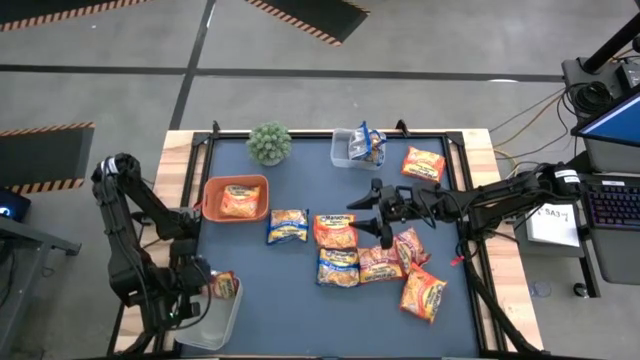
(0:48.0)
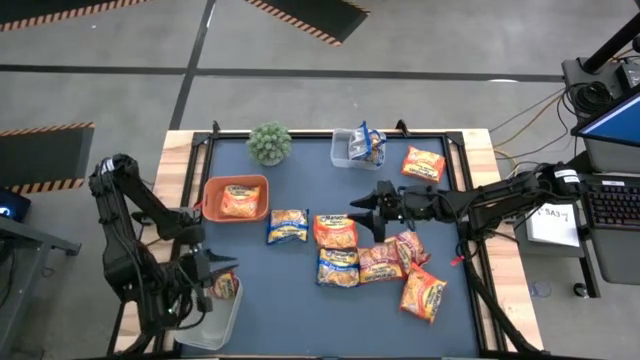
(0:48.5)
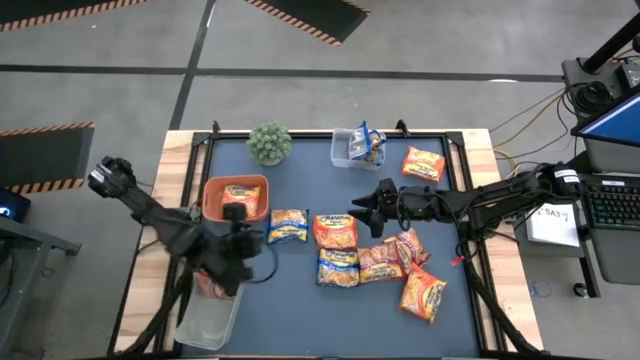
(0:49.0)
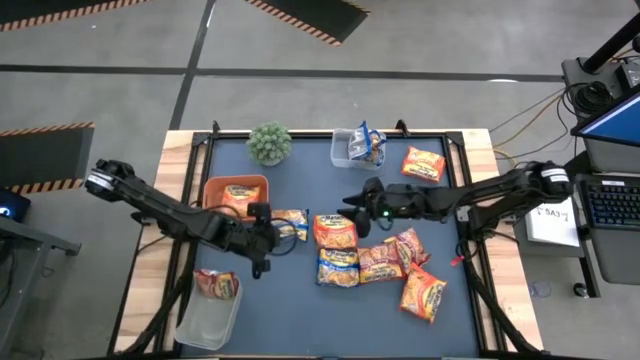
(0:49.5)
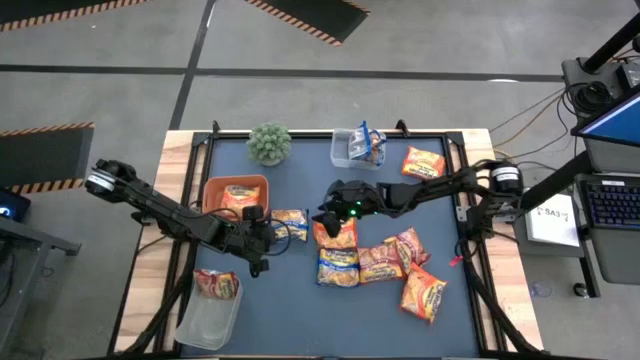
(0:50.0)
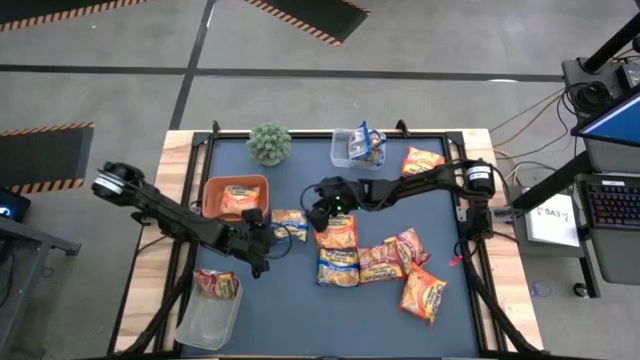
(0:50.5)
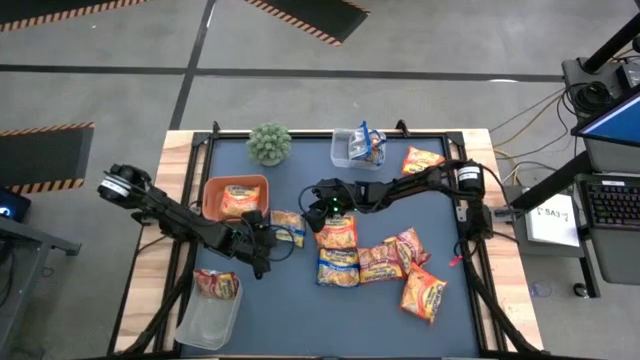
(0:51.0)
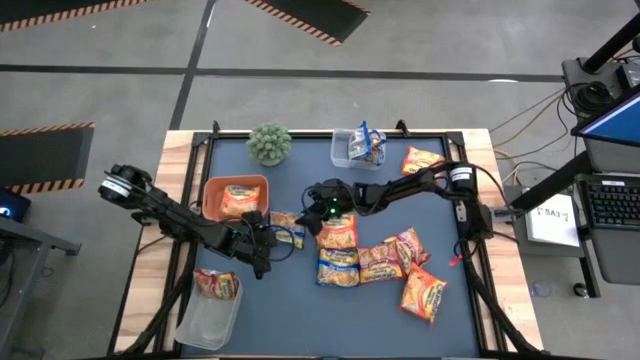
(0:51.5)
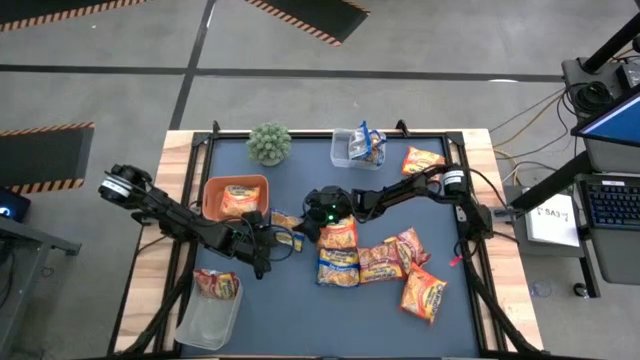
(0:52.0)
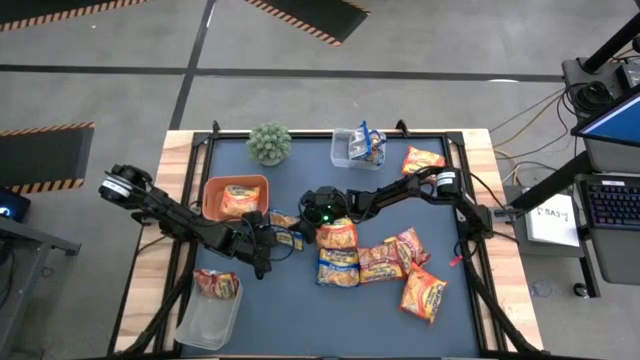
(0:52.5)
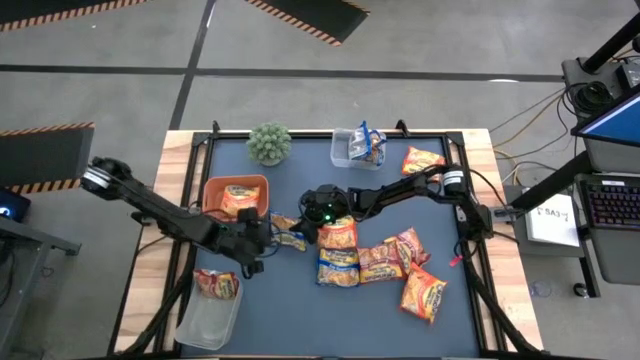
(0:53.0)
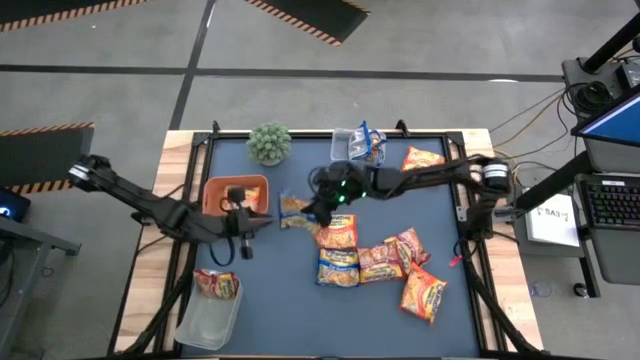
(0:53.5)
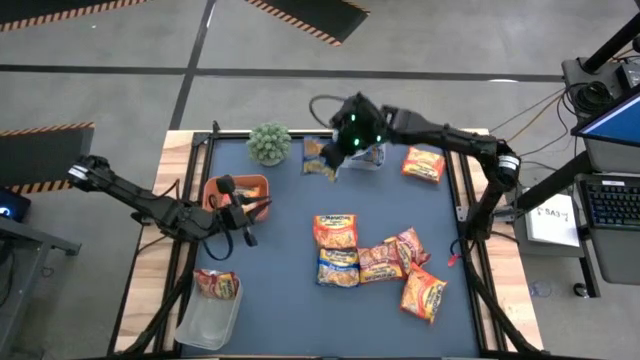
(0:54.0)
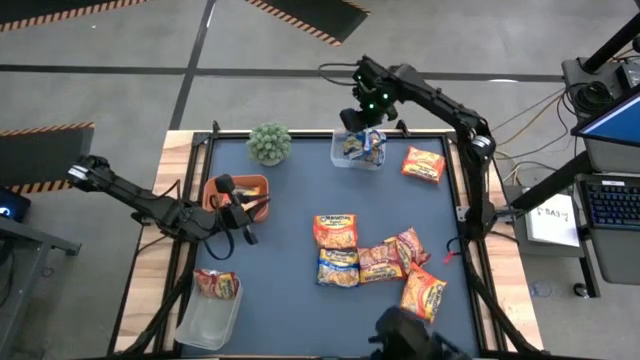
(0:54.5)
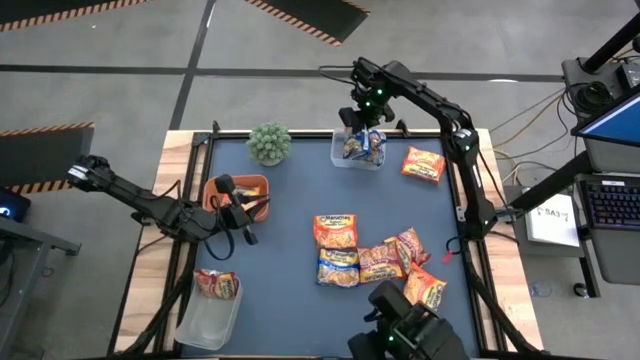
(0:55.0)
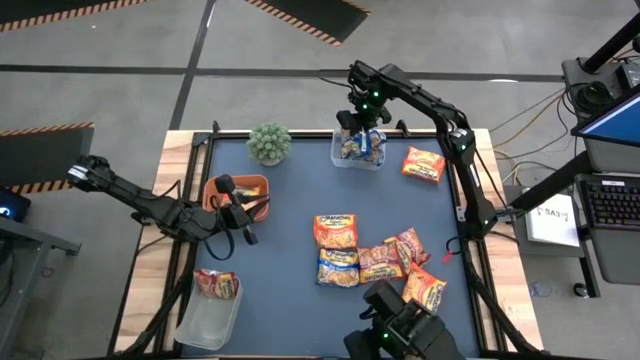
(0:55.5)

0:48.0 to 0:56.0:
Task: Sort Maruchan noodles
Put the blue noodle pack into the transparent bin

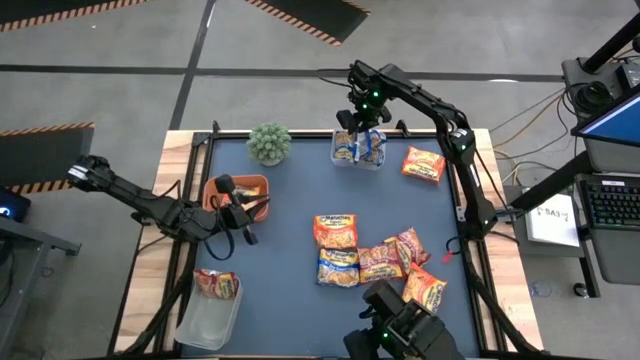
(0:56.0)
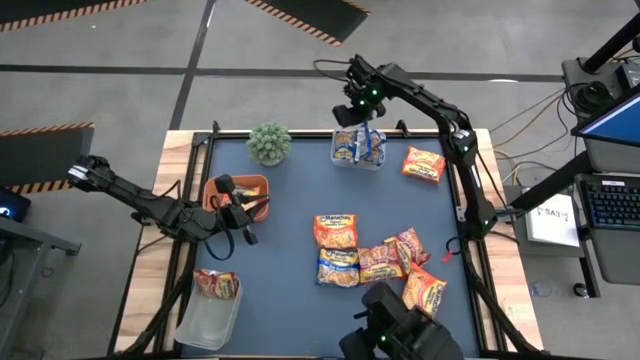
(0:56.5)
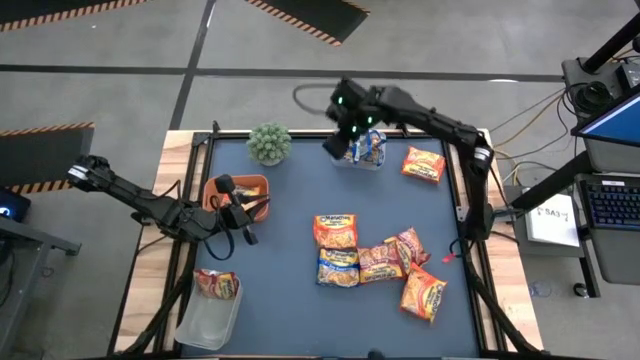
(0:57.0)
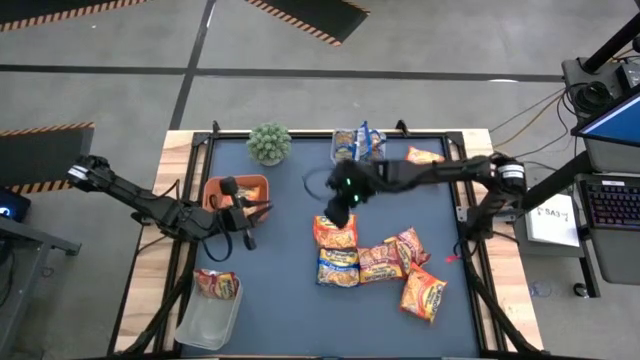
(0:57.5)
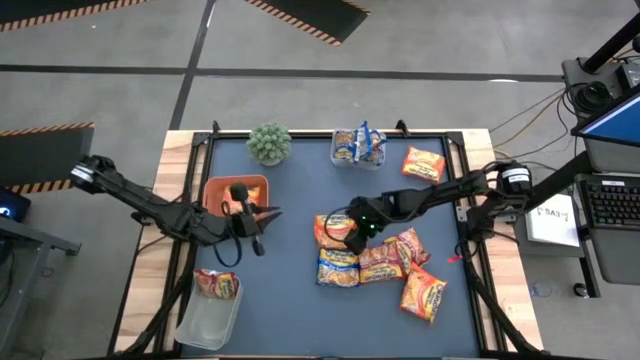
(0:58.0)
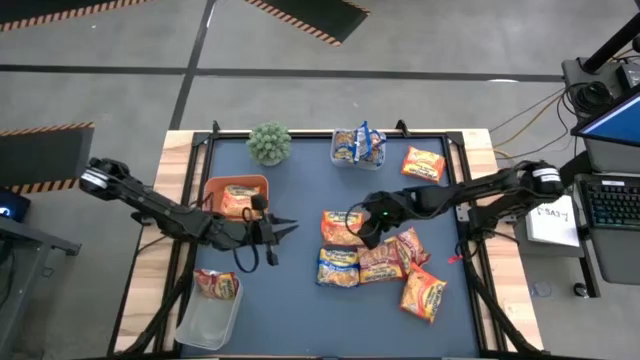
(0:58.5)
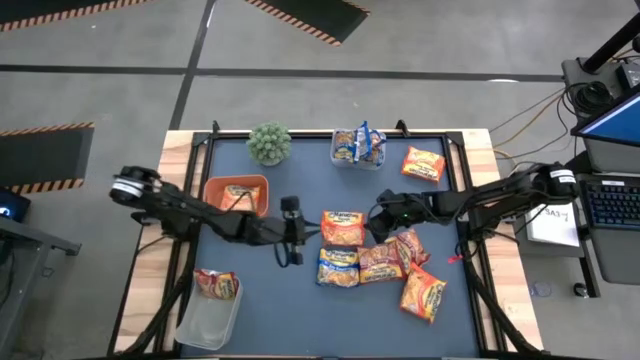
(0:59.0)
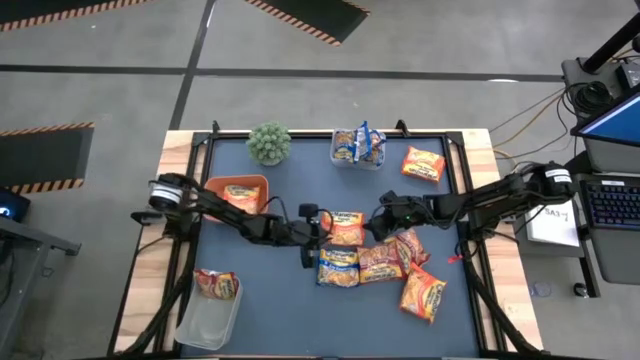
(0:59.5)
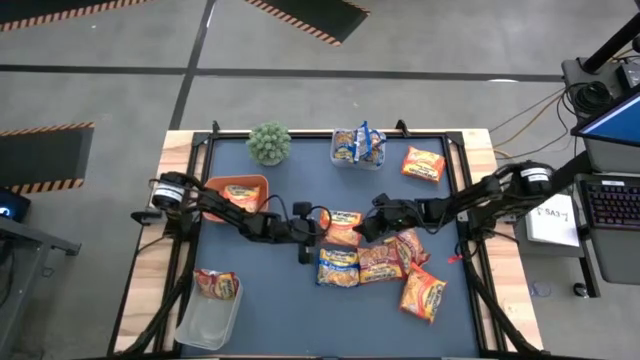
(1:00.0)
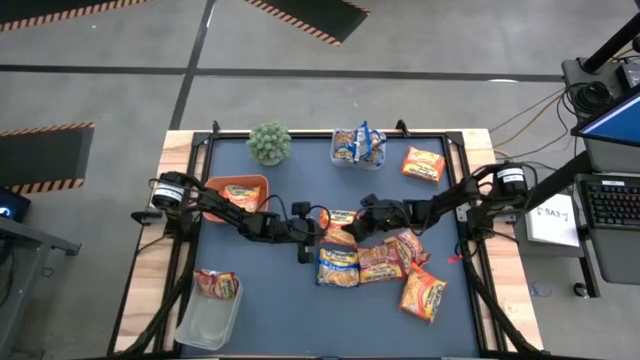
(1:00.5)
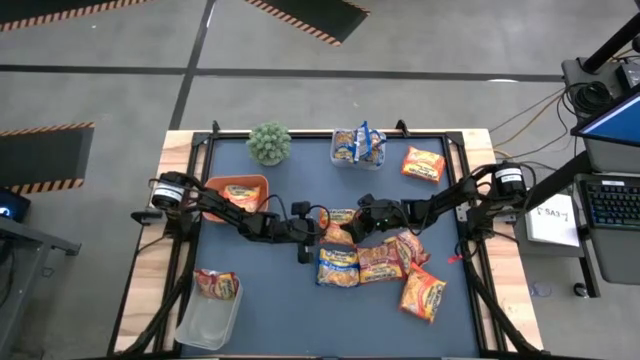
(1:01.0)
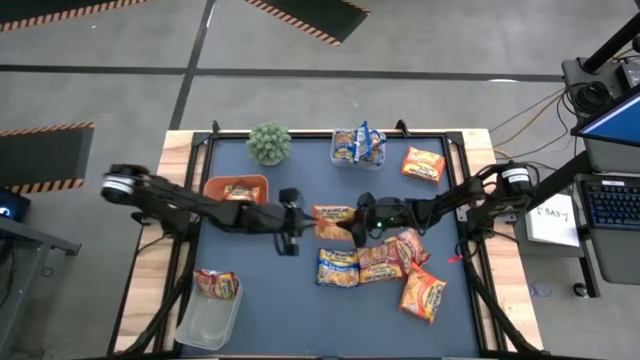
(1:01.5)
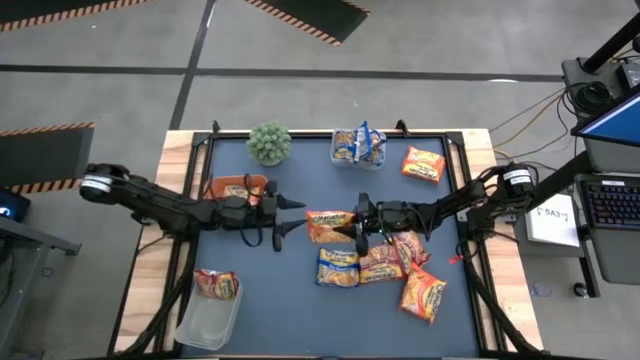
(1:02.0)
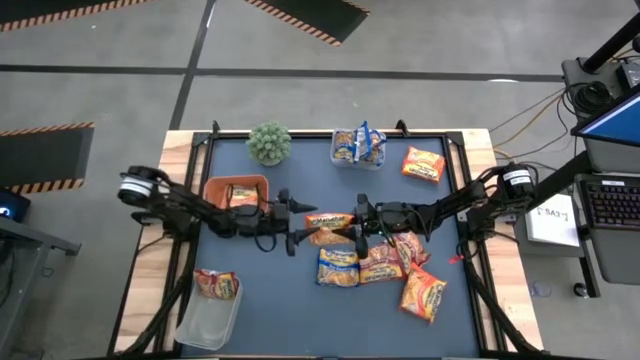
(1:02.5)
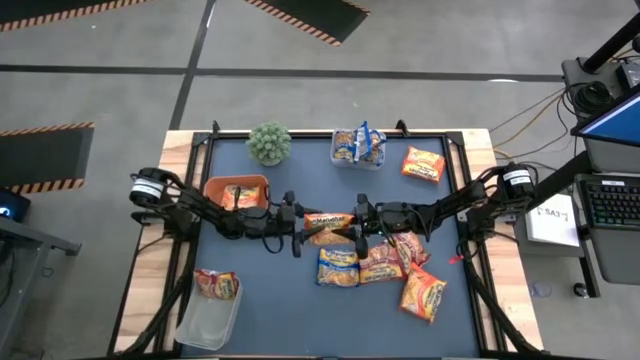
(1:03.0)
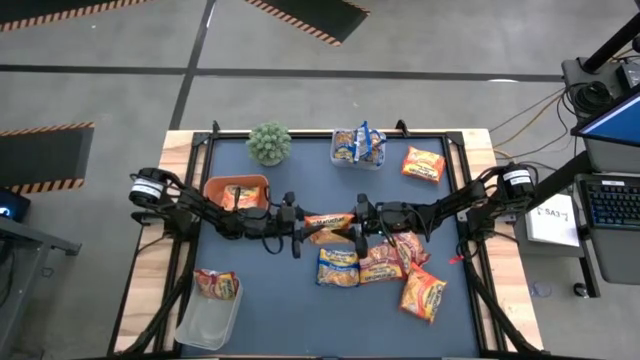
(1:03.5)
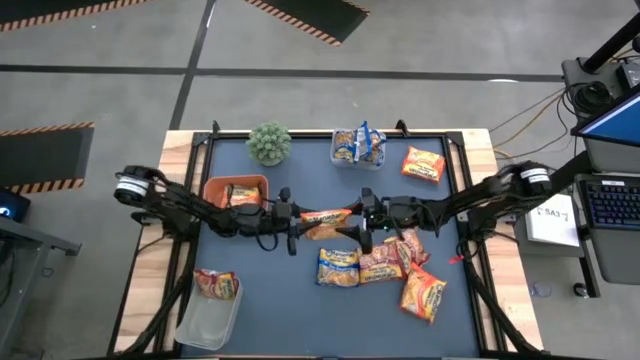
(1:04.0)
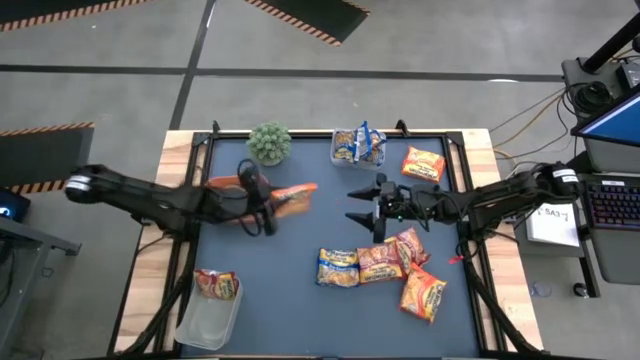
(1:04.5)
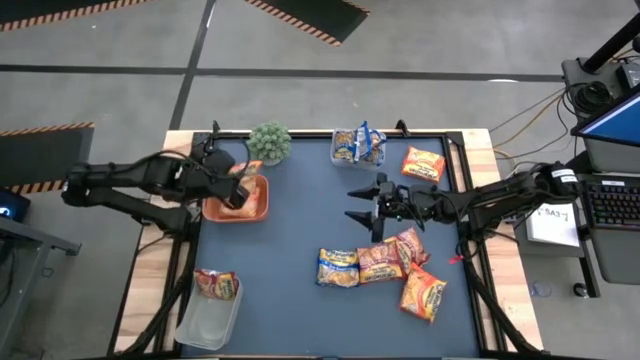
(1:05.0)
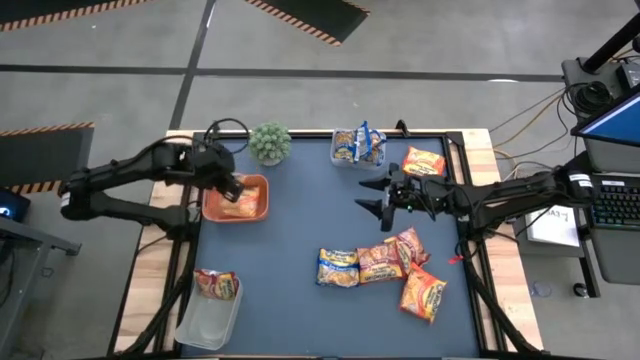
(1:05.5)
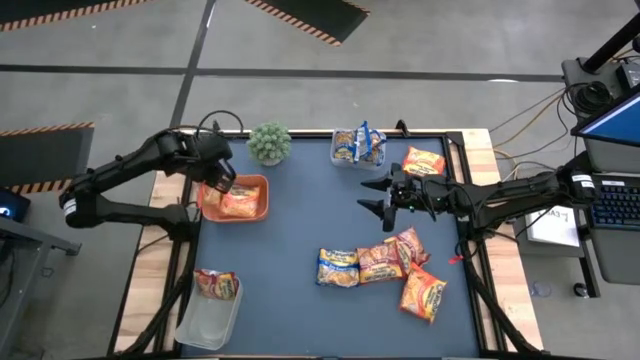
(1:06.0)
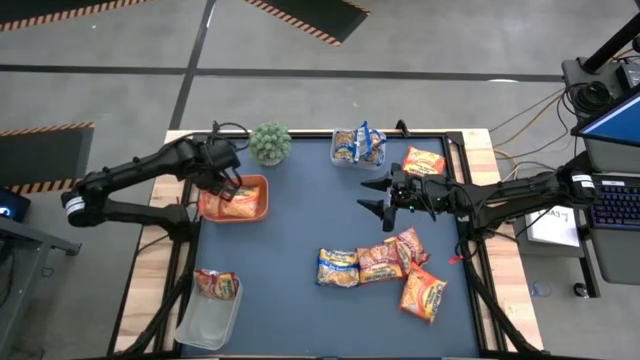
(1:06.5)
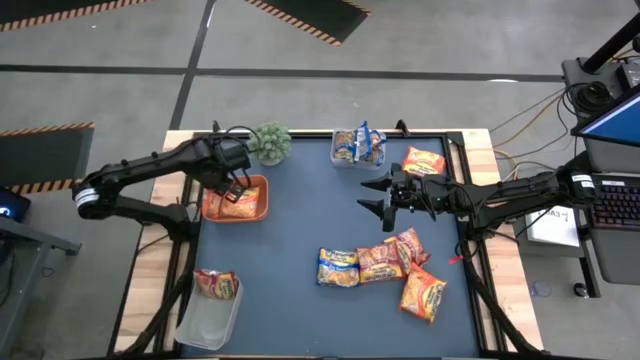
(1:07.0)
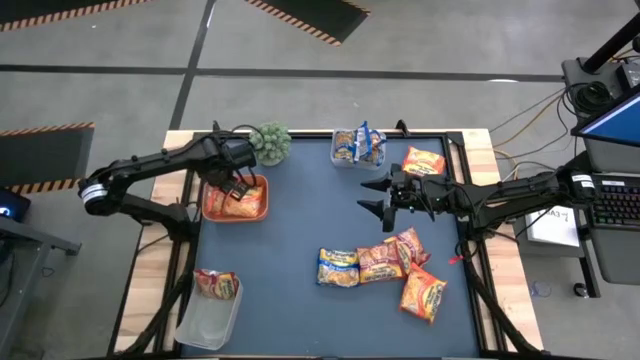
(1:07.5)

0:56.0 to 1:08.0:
Put the orange noodle pack into the orange bin

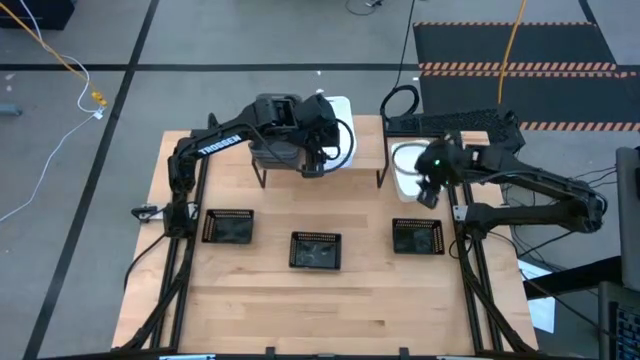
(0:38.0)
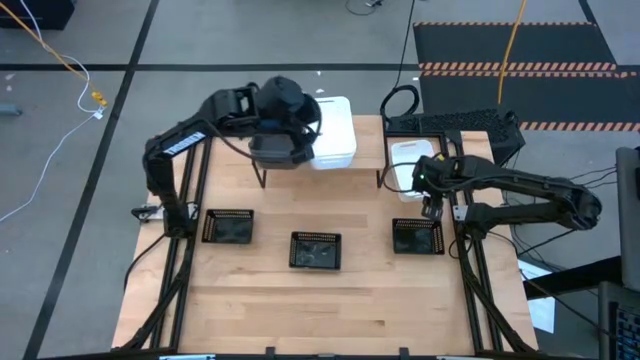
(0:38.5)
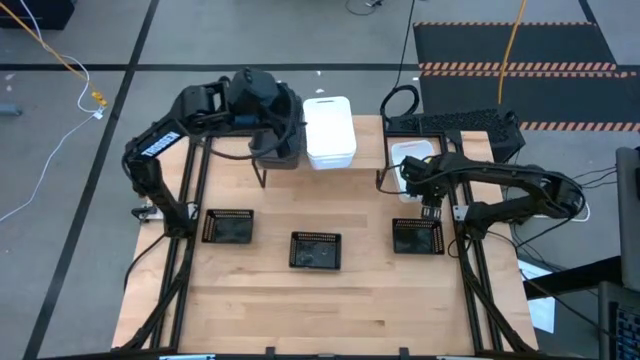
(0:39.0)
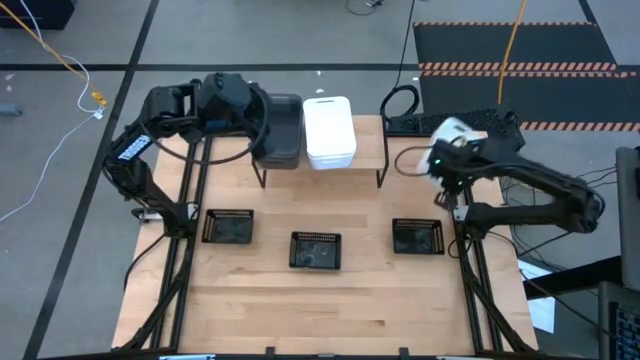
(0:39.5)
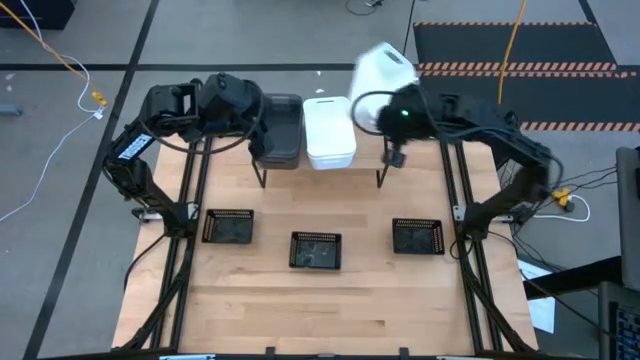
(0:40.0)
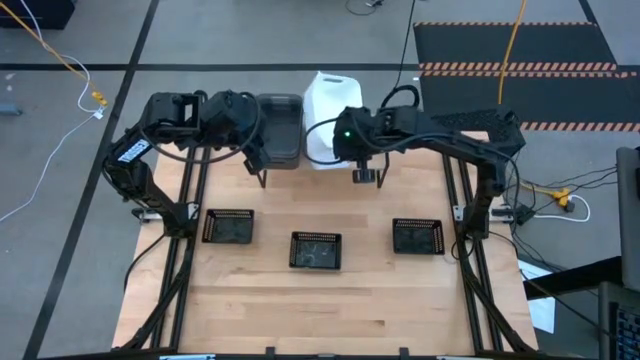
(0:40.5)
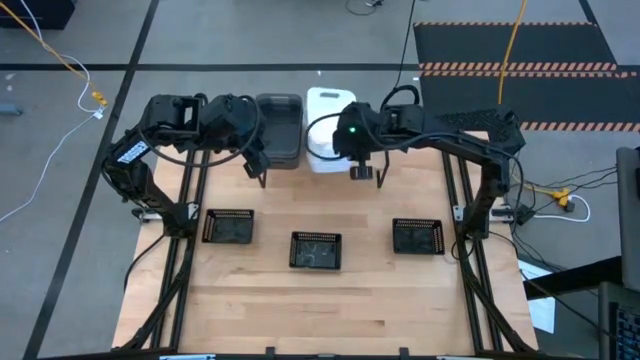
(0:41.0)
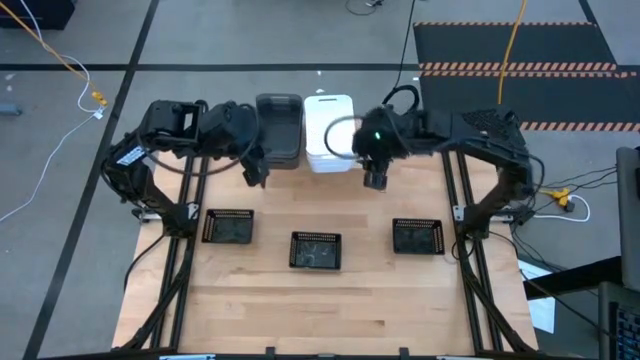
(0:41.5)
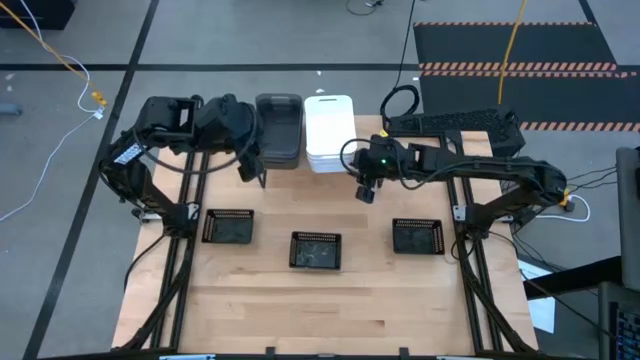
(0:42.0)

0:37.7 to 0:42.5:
Task: Stack baskets on shelf by color
Stack the white bin on the stacked white bins on the shelf
